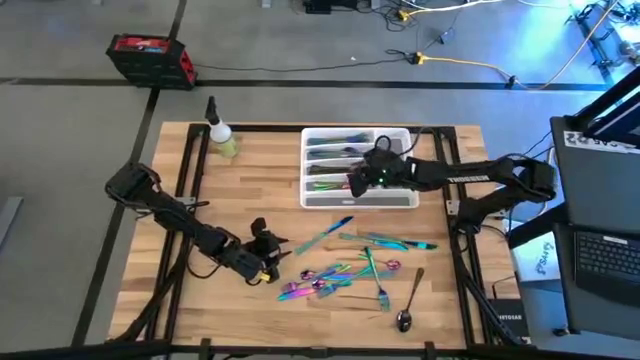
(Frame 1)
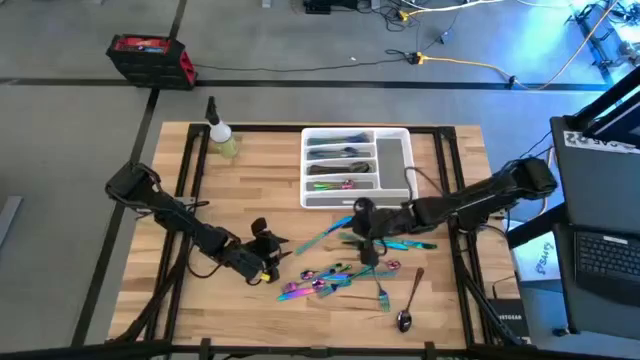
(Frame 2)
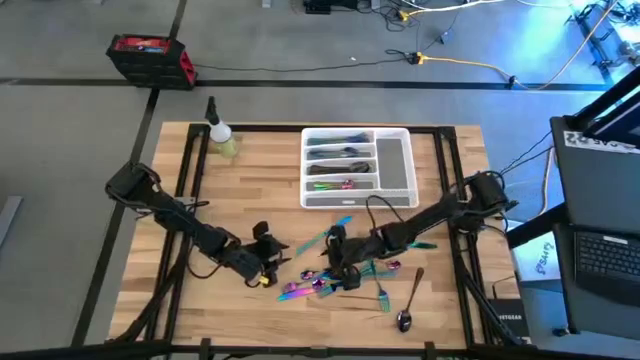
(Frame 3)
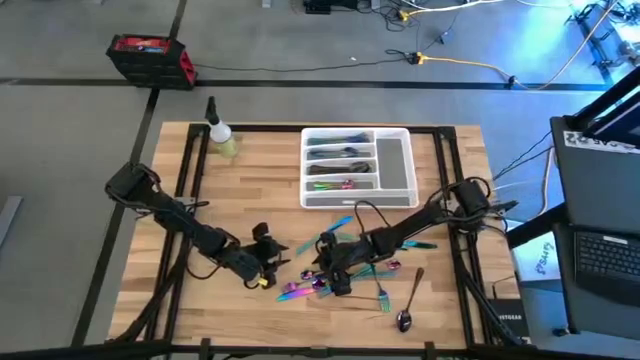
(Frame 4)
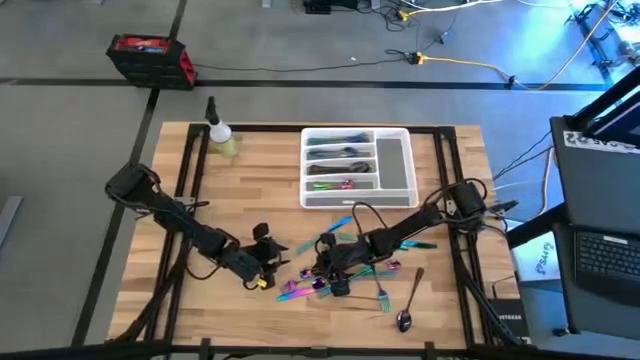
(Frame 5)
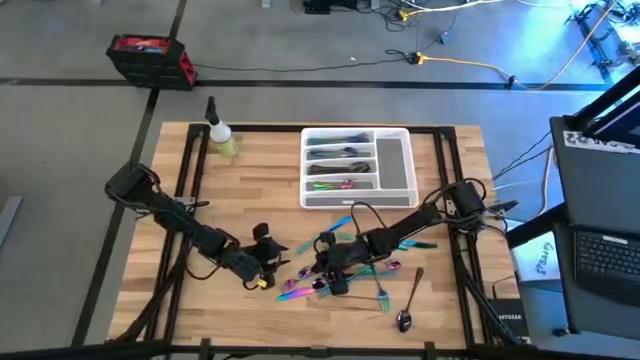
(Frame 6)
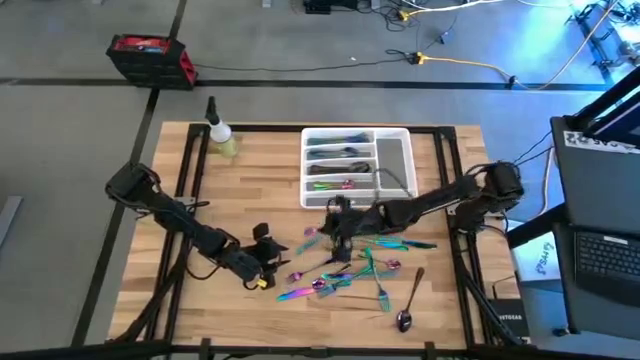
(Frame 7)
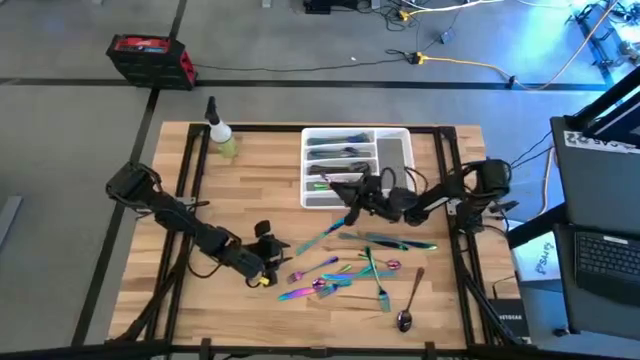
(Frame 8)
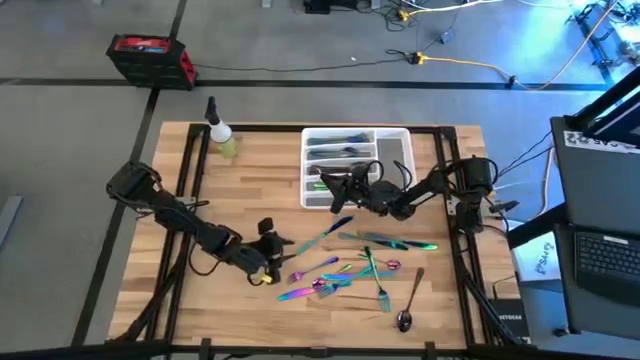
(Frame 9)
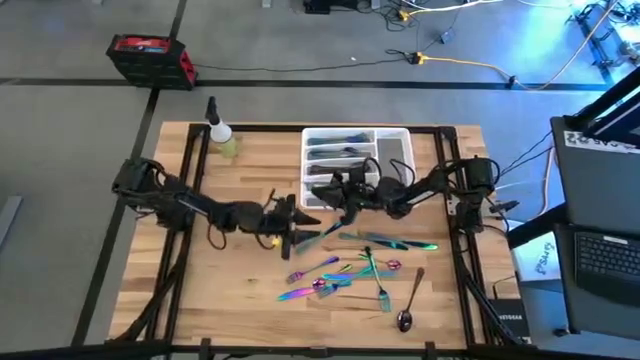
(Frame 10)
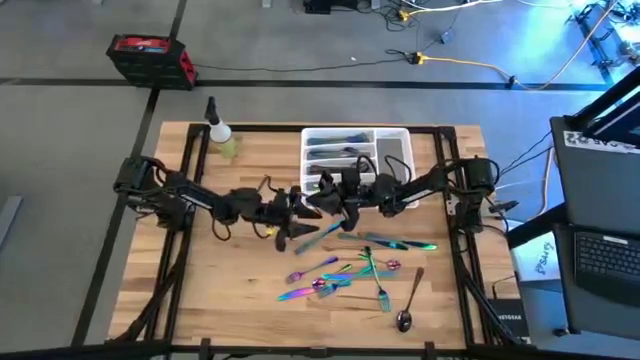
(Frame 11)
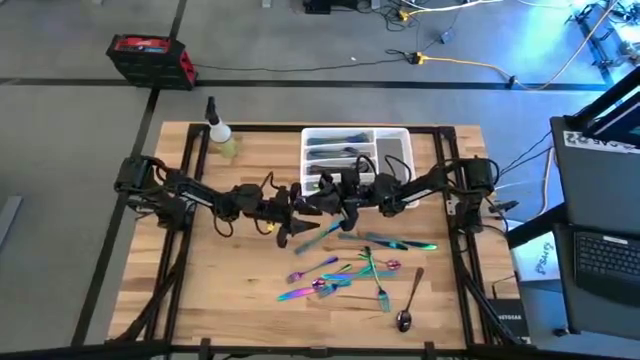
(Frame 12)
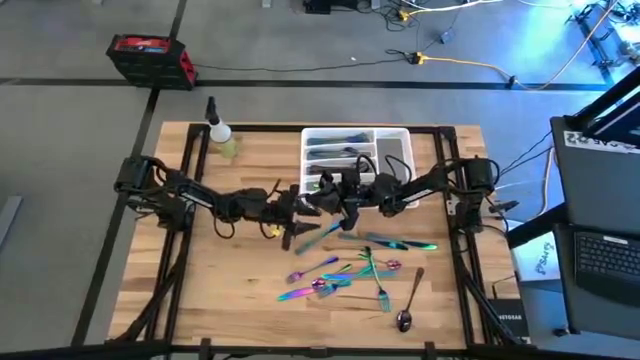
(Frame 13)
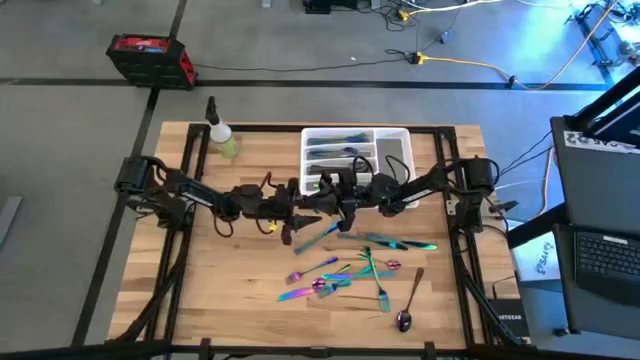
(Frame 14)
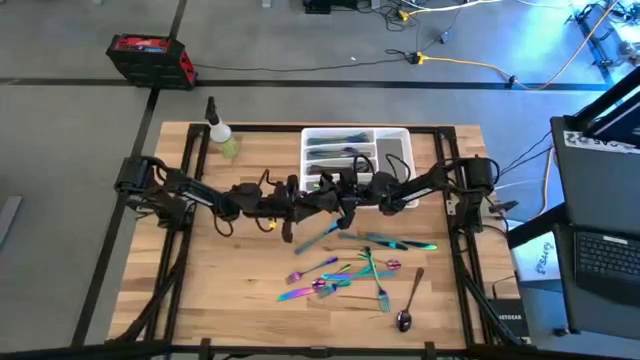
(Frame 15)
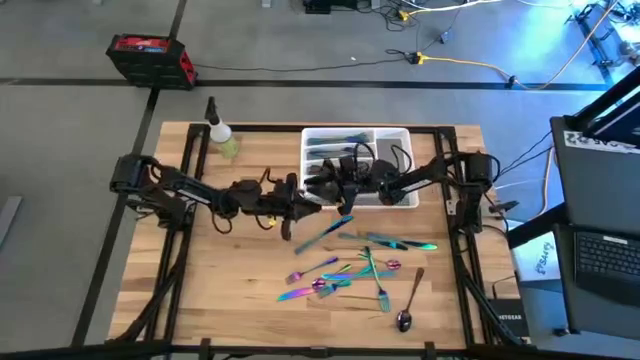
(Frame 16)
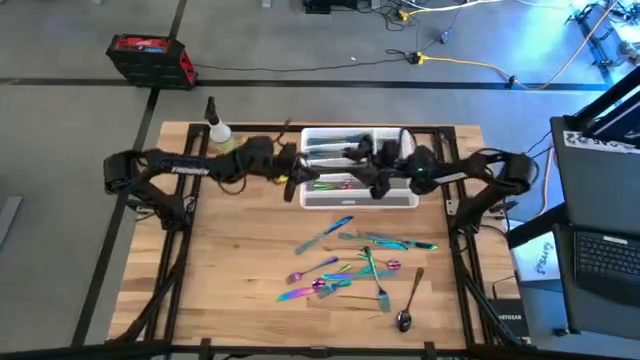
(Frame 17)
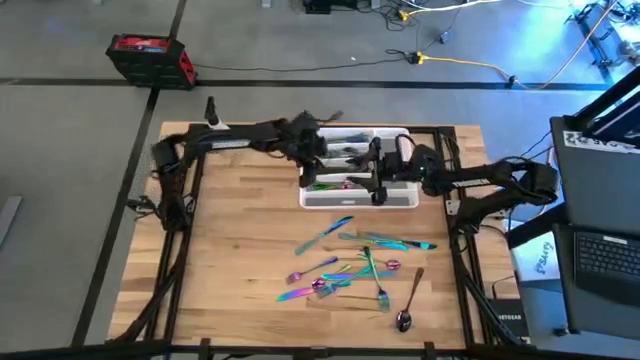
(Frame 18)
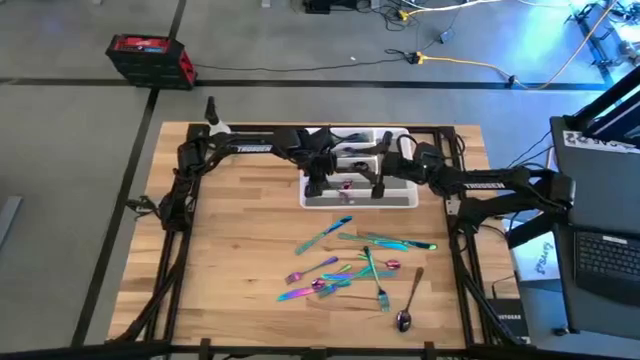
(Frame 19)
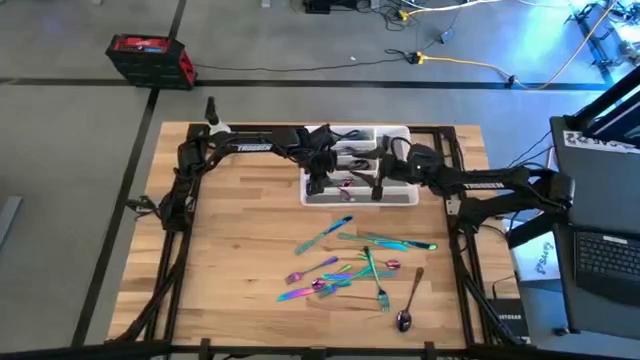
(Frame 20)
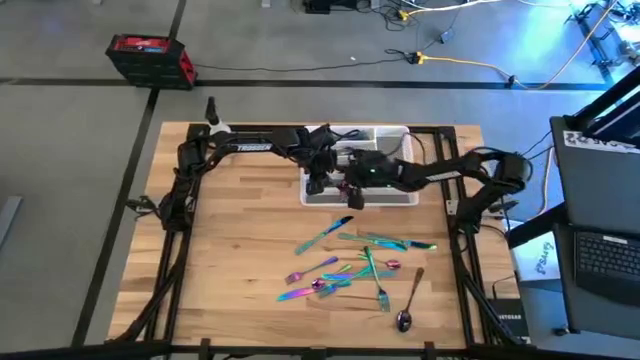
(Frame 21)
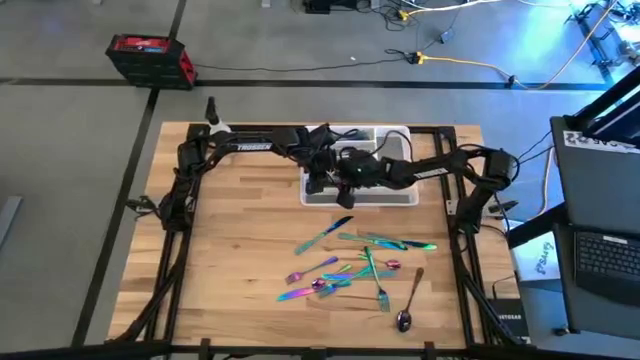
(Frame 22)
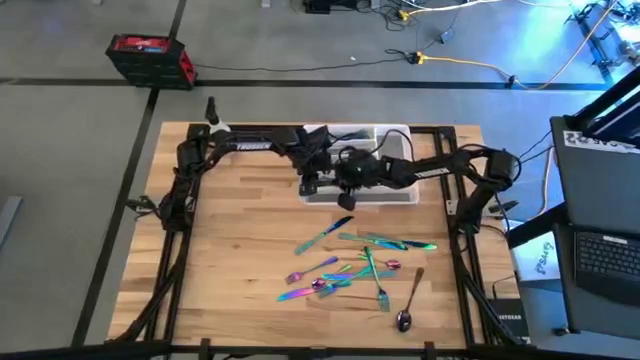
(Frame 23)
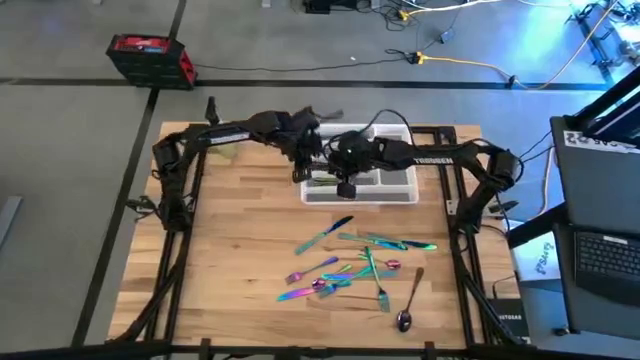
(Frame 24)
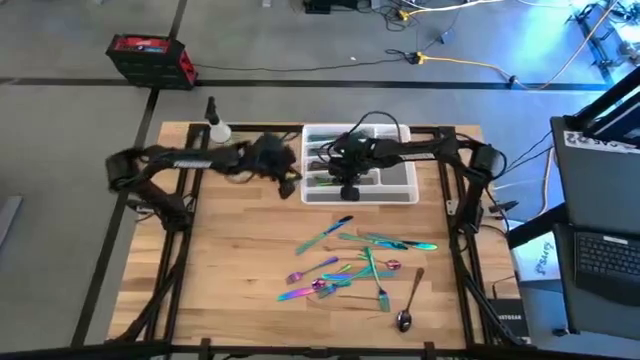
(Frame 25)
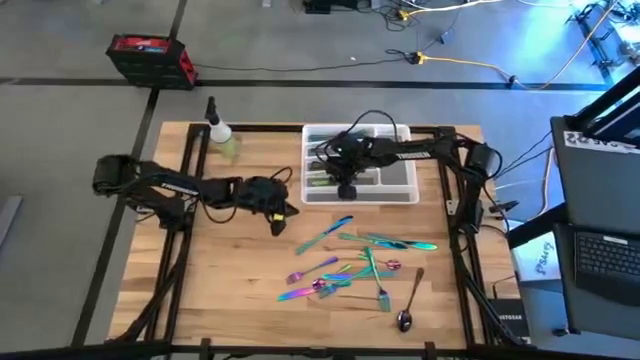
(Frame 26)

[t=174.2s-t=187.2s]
Task: Sort silverware
Put the blue teaspoon on the white silverware tray

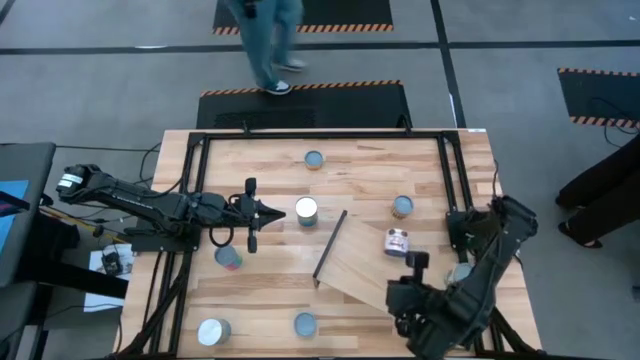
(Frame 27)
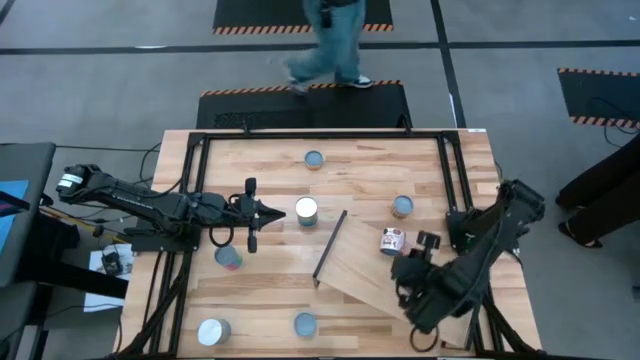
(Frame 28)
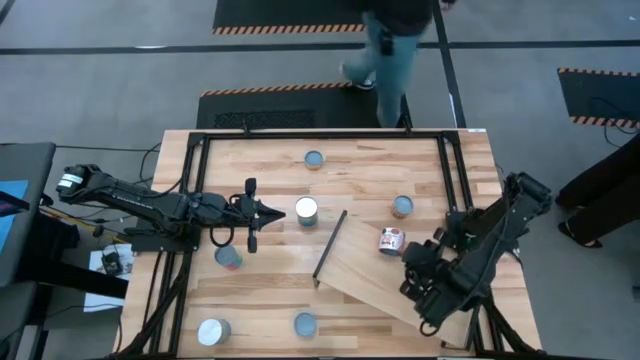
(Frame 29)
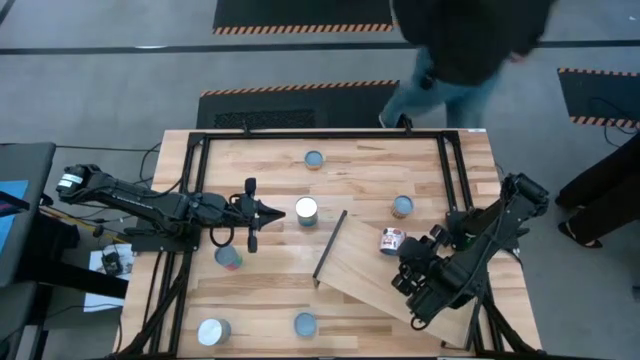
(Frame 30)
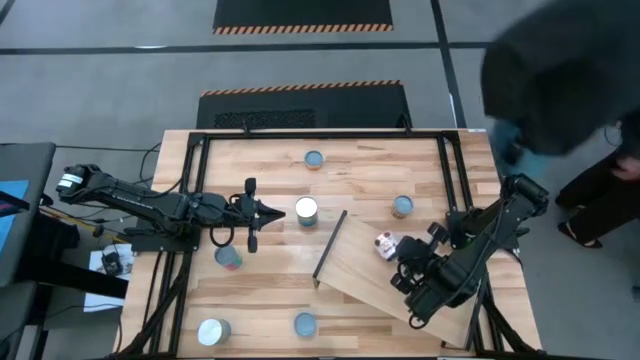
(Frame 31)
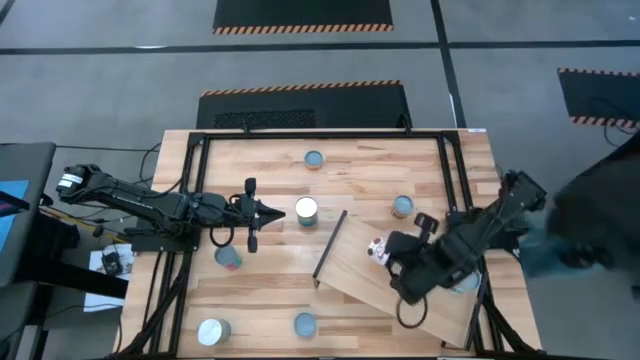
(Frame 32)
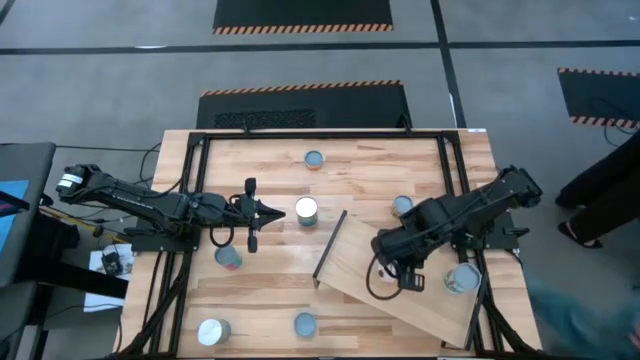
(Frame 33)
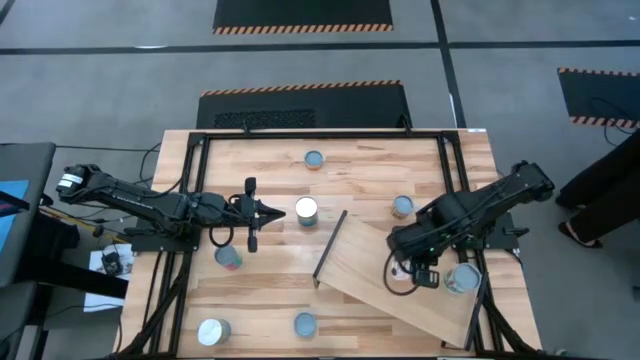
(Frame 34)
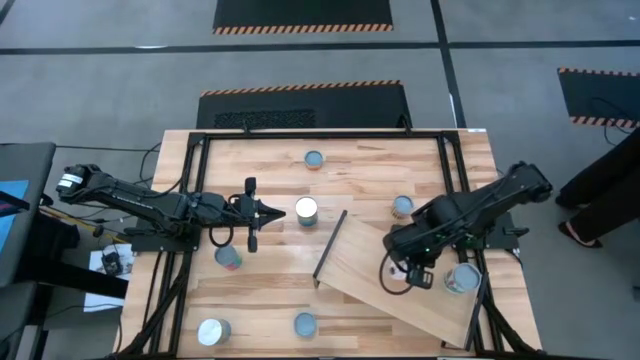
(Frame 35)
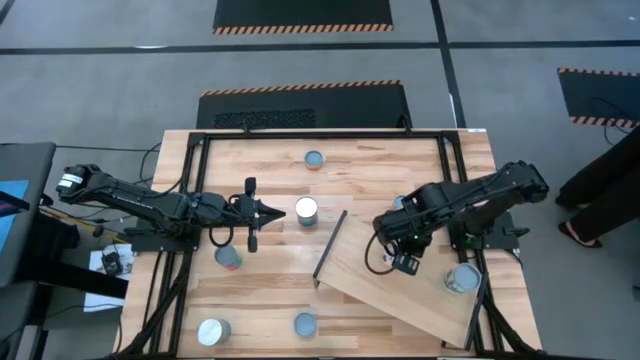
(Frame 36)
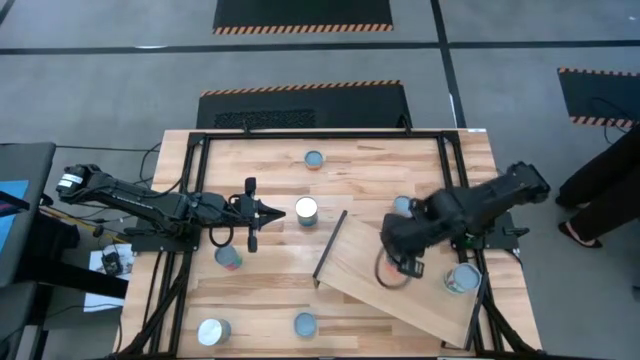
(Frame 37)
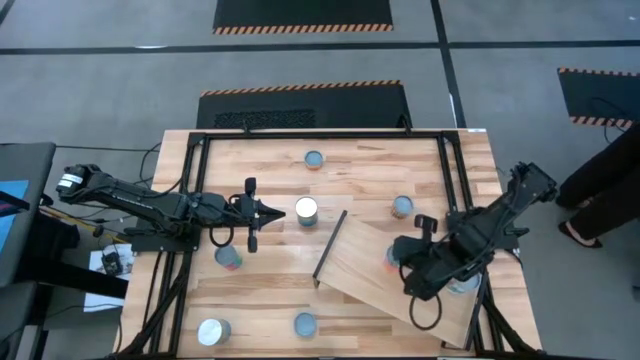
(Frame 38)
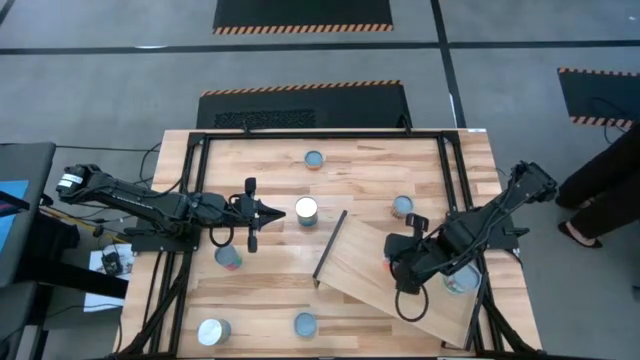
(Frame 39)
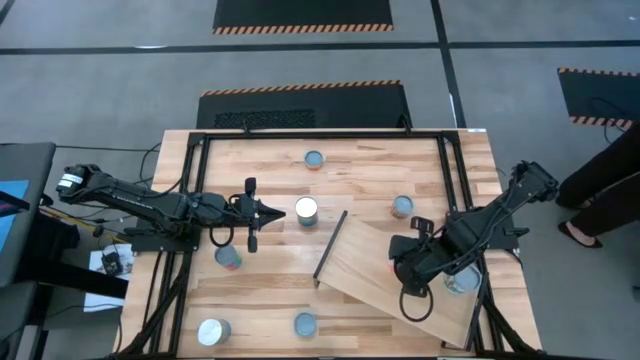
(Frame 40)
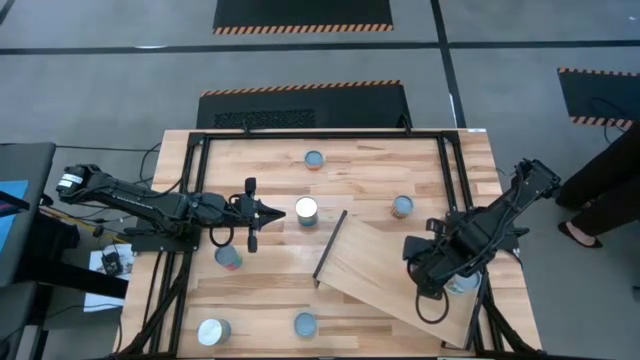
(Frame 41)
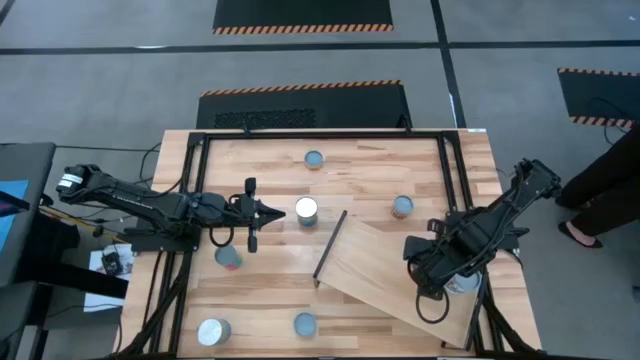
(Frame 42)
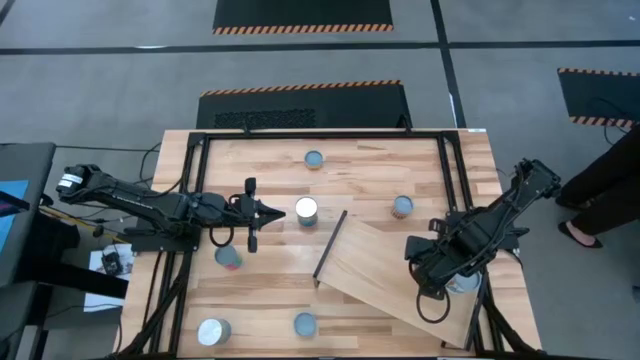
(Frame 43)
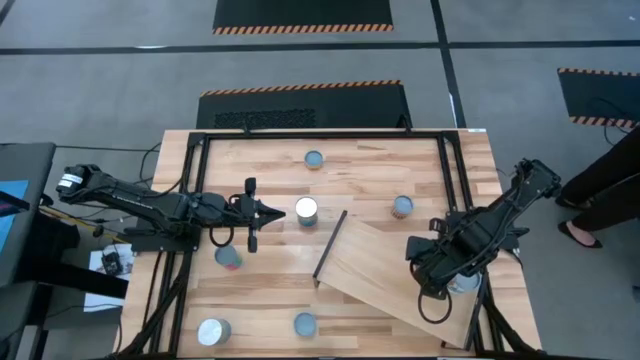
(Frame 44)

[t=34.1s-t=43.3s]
Task: Pick and place cans onto a shelf
Put the canned tomatoes on the shelf

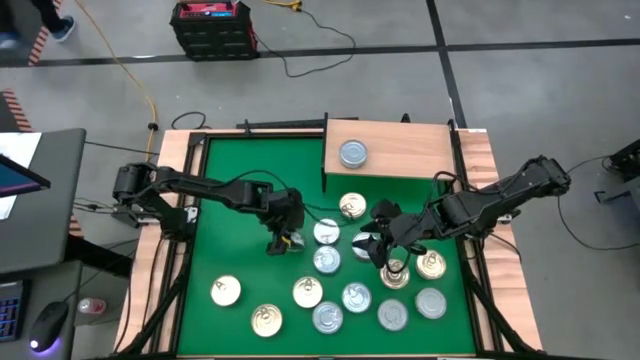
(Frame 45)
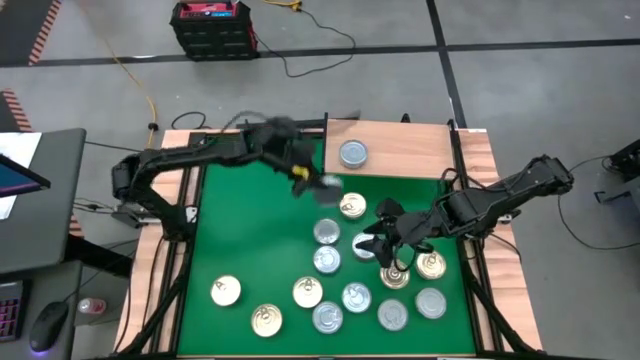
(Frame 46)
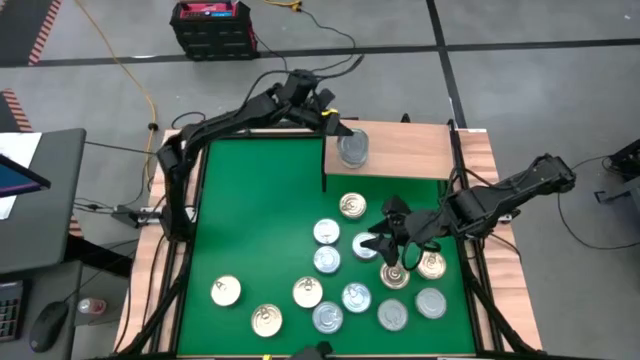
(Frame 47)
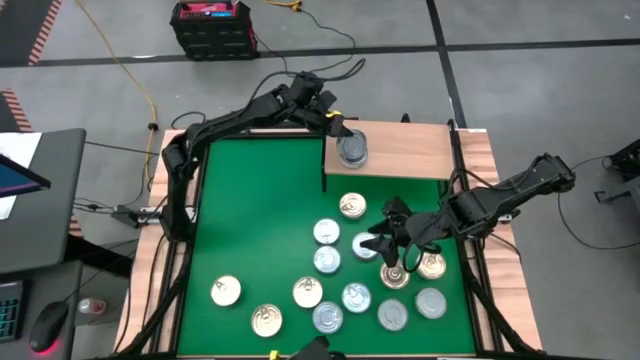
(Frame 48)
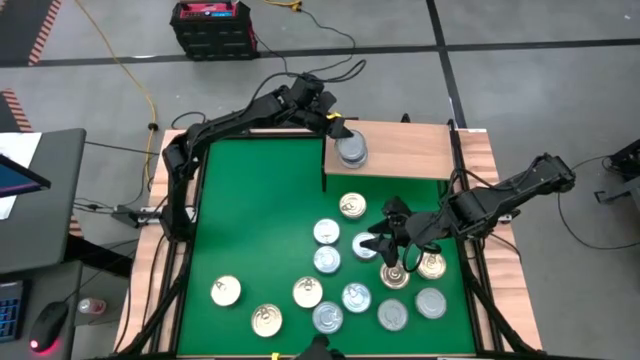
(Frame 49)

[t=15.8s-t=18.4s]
Task: Stack canned seafood by type on shelf
Stack the green with white tuna can on top of the green with white tuna can
